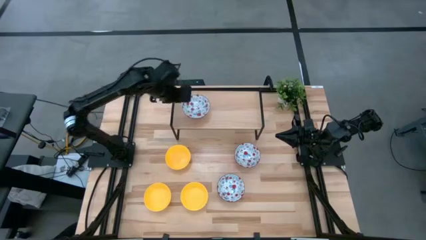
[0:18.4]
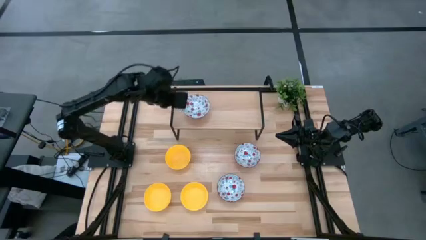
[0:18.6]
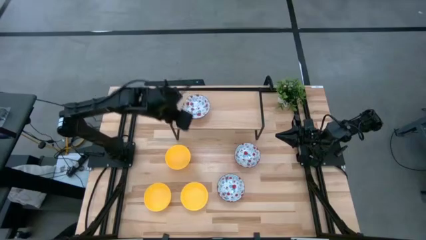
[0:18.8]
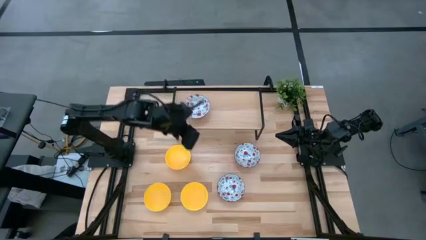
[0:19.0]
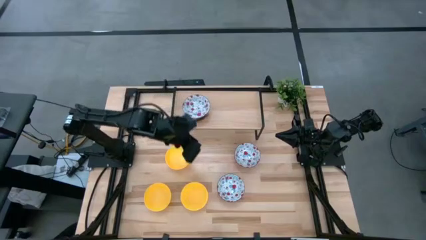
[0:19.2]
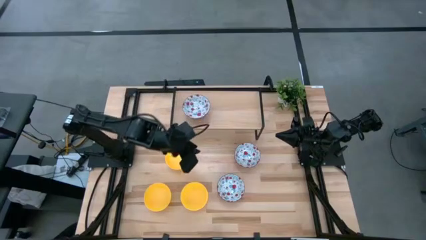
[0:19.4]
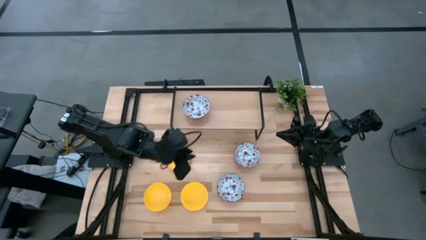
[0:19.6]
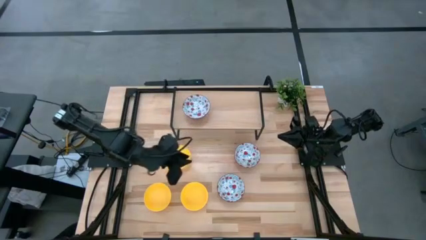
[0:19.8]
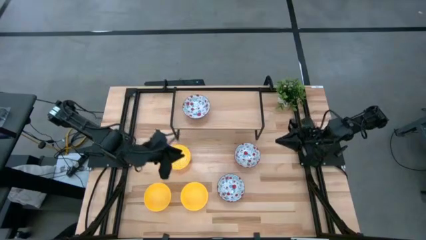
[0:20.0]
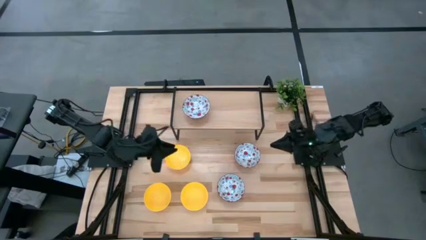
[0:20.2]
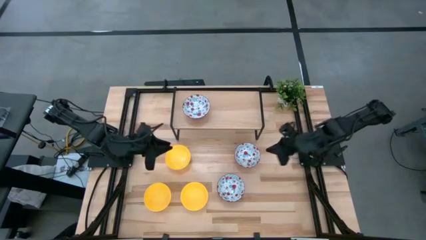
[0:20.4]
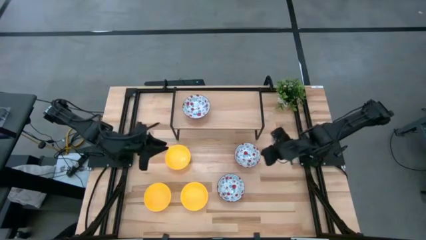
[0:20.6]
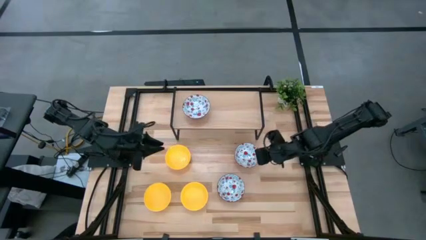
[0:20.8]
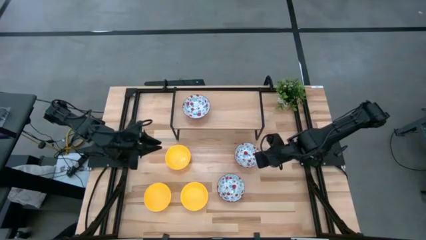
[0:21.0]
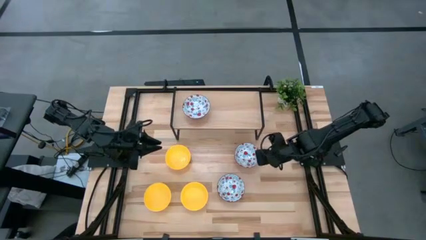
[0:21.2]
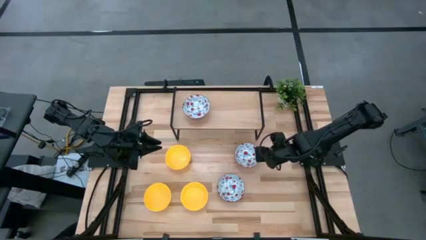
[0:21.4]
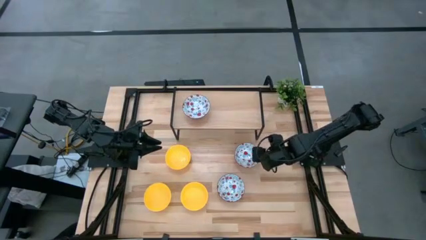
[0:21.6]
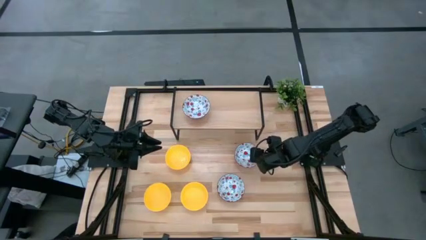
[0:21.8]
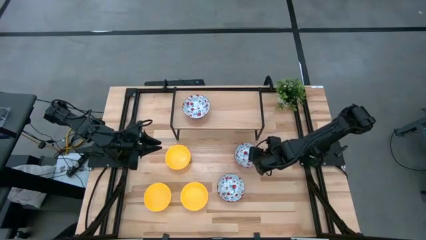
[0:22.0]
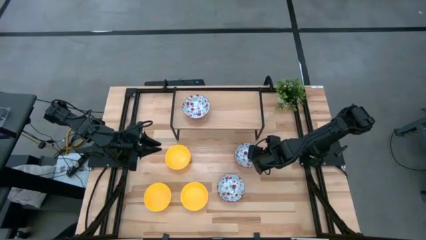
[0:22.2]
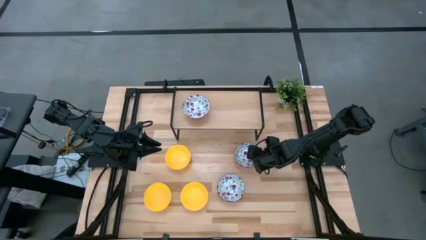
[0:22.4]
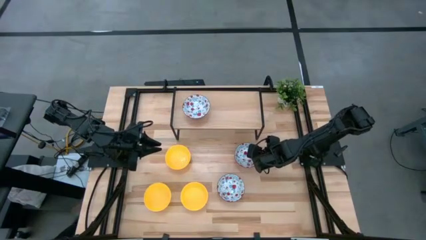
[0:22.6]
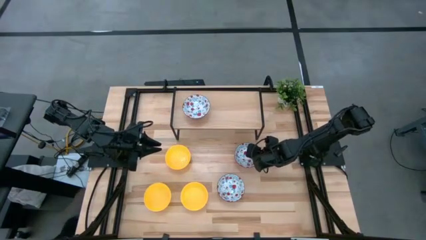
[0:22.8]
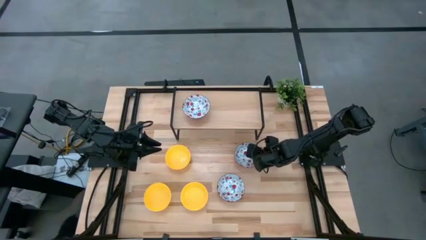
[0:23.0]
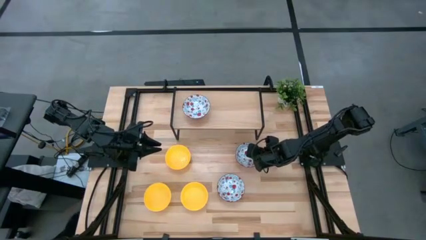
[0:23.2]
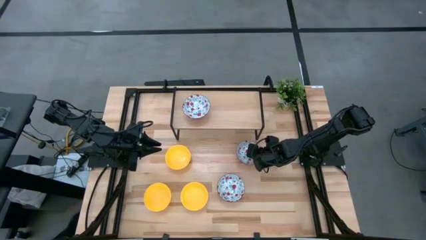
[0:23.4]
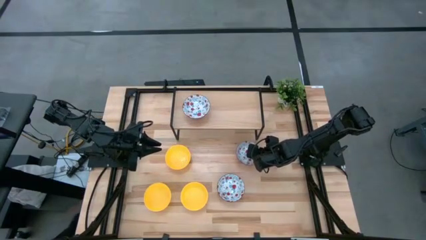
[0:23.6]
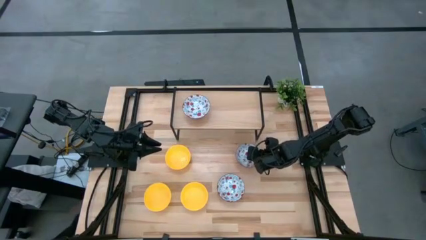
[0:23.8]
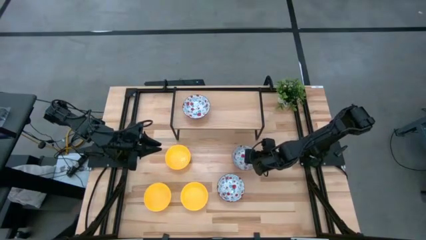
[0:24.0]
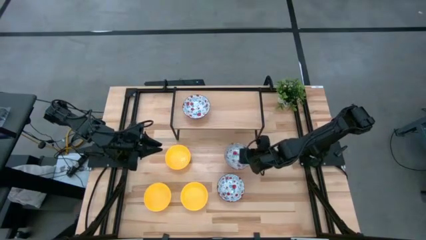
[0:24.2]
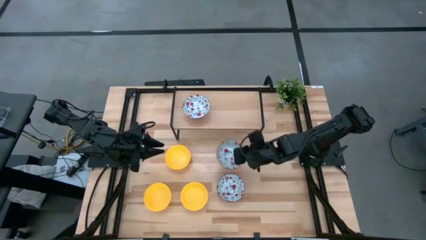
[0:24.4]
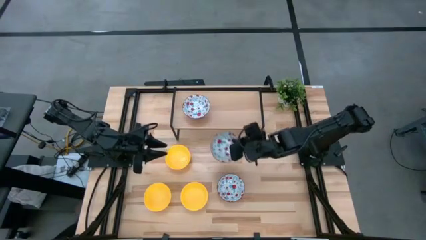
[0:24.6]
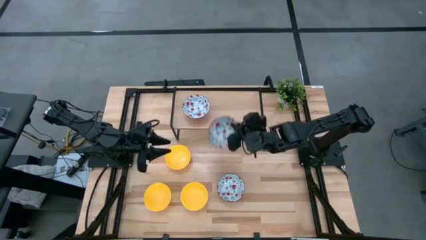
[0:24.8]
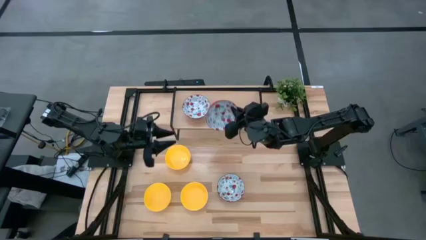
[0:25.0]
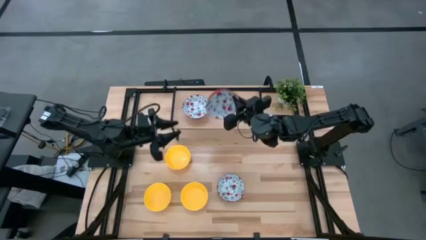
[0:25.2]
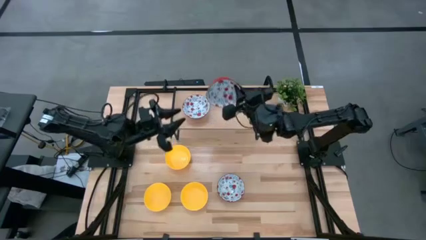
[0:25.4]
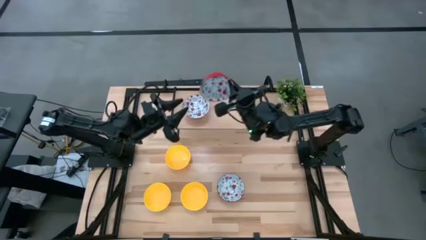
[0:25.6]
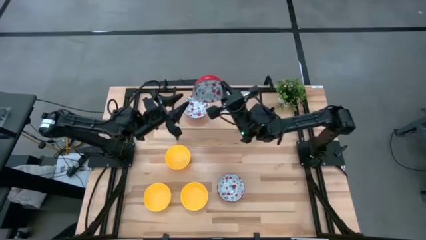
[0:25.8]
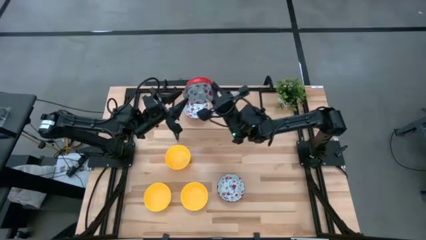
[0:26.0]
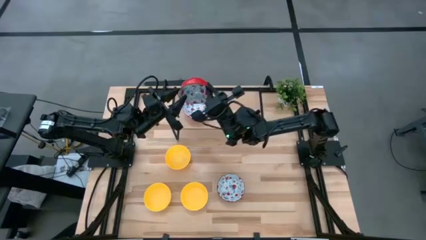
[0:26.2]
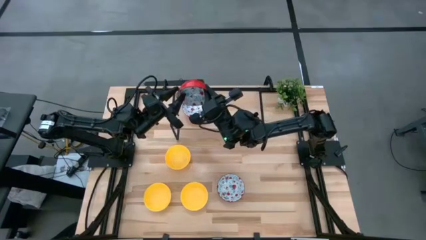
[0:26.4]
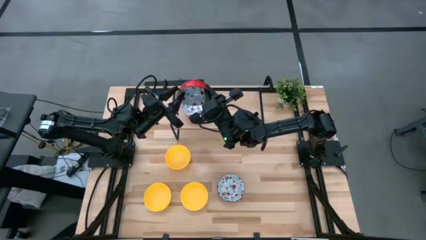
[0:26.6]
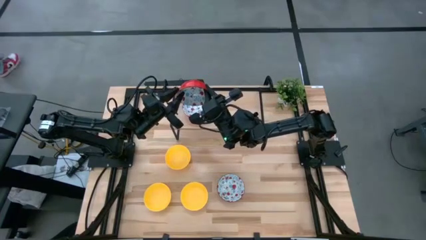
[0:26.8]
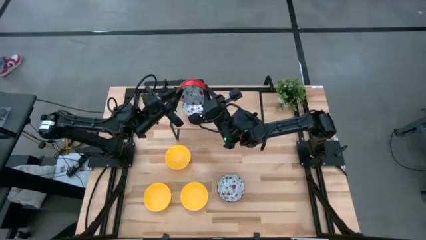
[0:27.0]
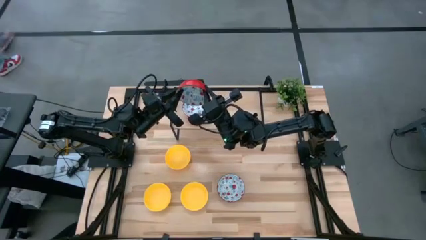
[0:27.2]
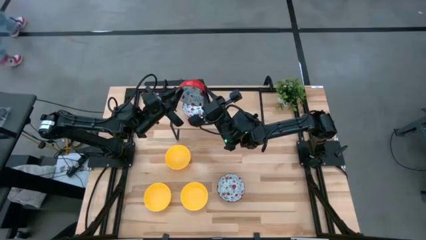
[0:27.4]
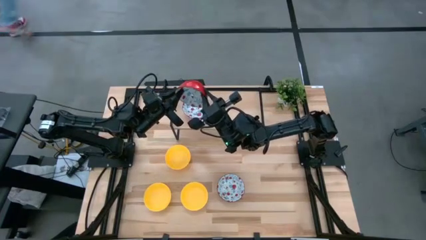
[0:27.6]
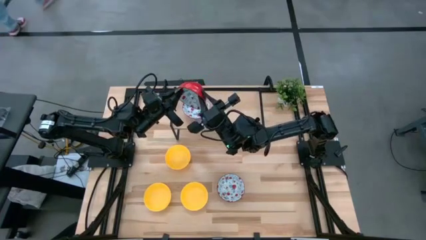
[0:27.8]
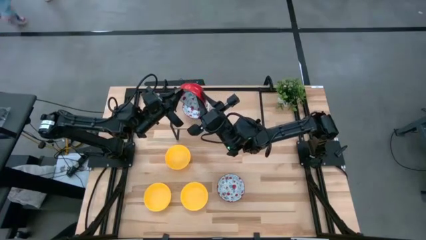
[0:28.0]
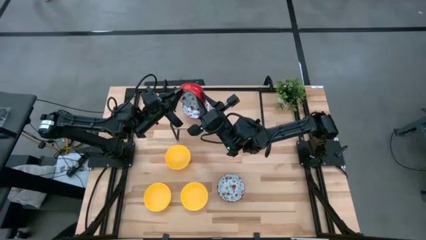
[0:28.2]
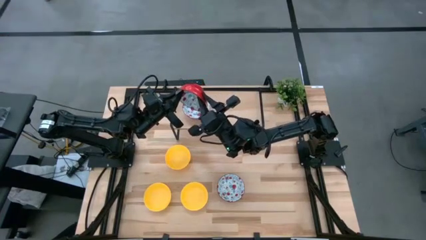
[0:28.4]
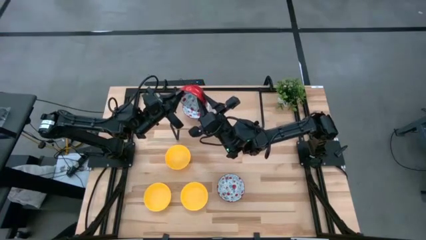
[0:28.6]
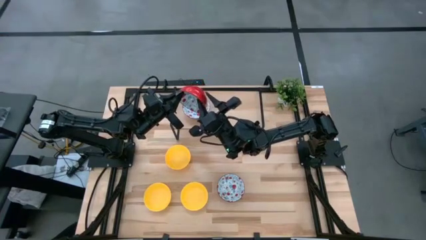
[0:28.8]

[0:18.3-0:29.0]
Task: Pick & Place Mini bowls
Stack the top red bowl on the red bowl on the shelf
